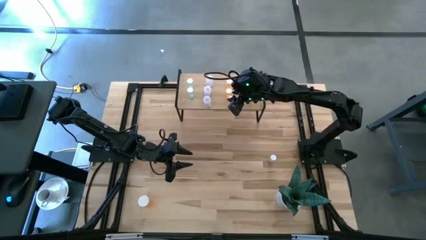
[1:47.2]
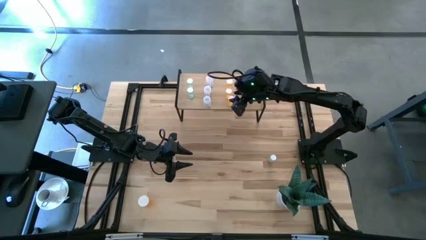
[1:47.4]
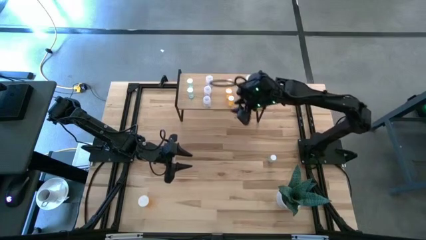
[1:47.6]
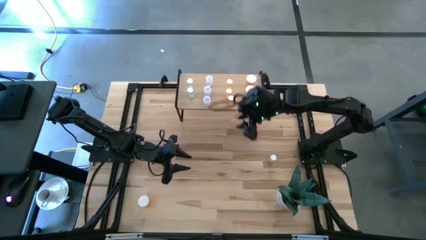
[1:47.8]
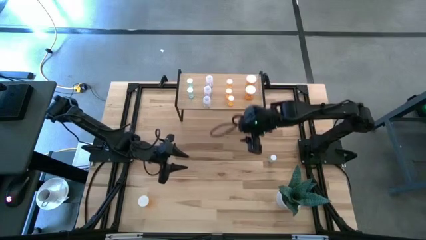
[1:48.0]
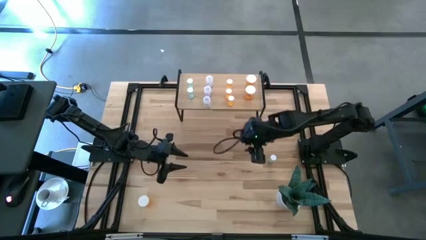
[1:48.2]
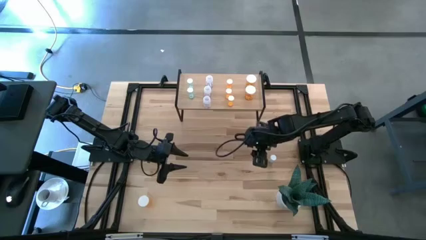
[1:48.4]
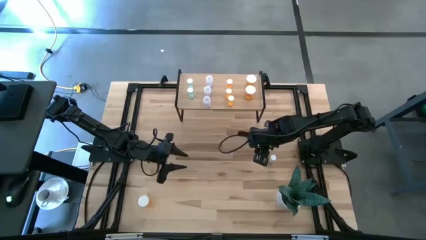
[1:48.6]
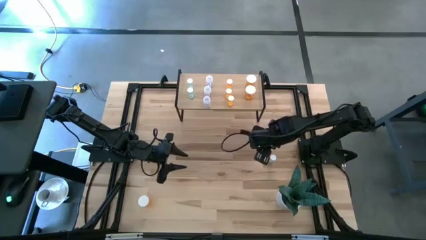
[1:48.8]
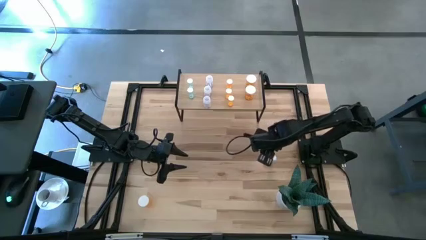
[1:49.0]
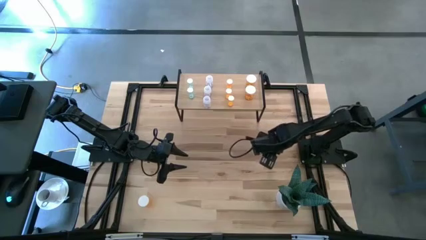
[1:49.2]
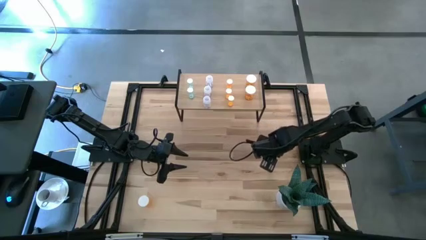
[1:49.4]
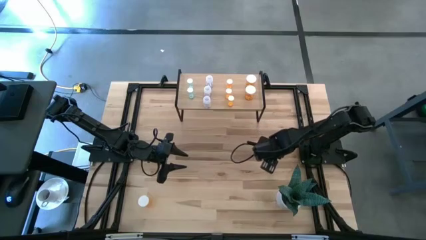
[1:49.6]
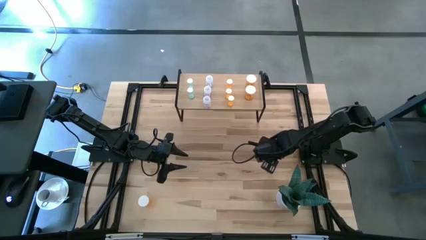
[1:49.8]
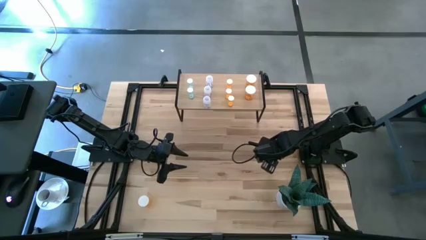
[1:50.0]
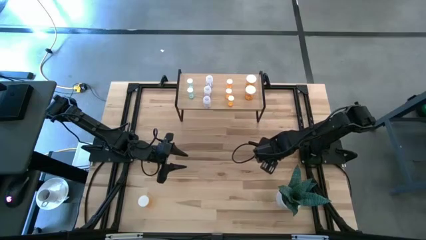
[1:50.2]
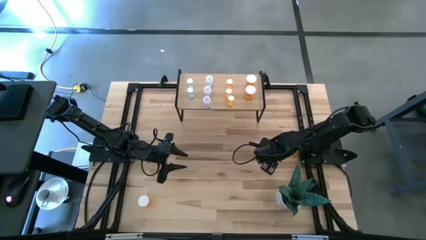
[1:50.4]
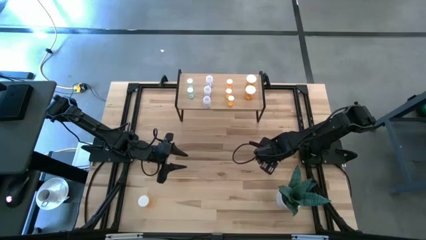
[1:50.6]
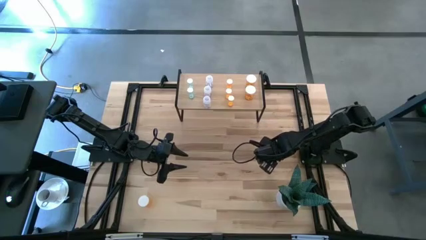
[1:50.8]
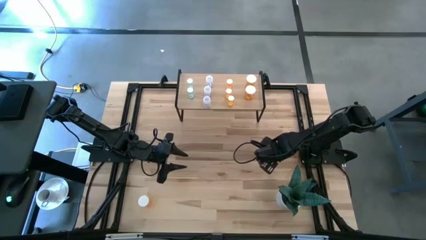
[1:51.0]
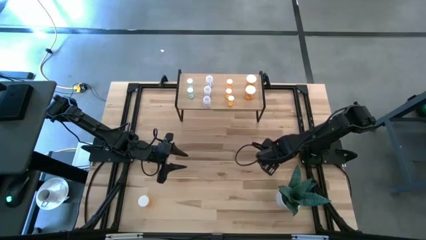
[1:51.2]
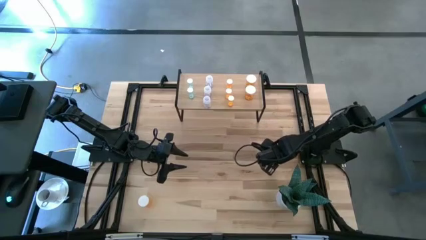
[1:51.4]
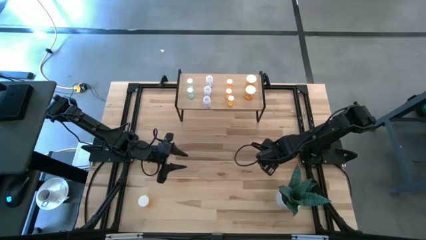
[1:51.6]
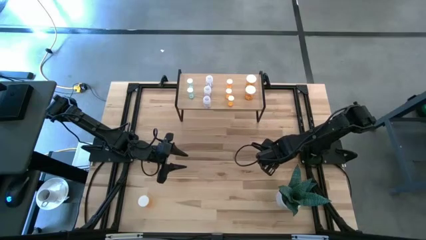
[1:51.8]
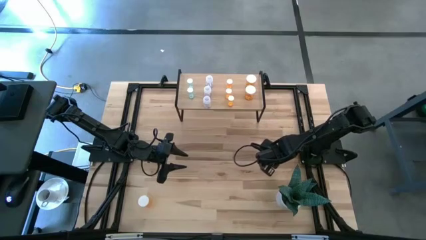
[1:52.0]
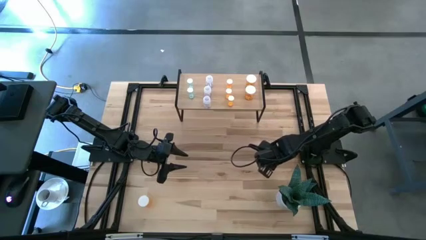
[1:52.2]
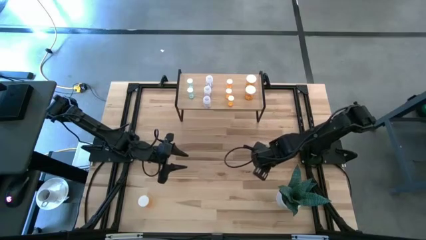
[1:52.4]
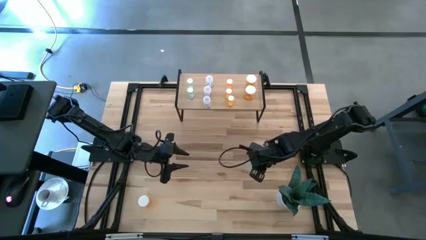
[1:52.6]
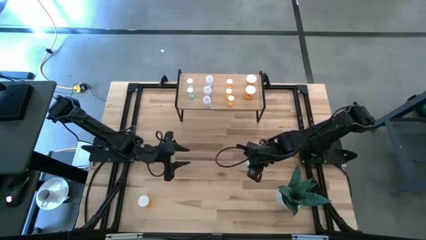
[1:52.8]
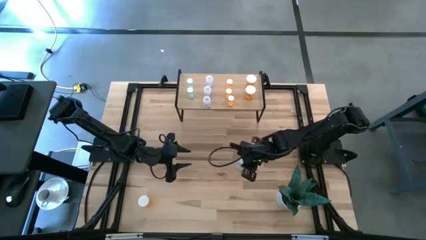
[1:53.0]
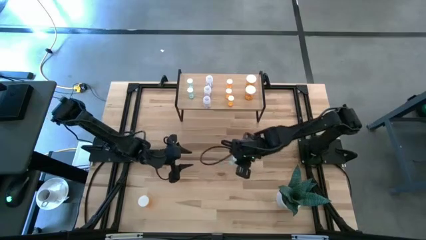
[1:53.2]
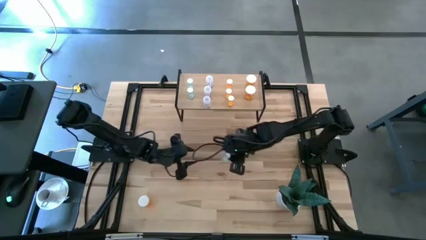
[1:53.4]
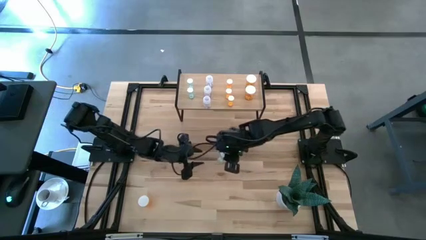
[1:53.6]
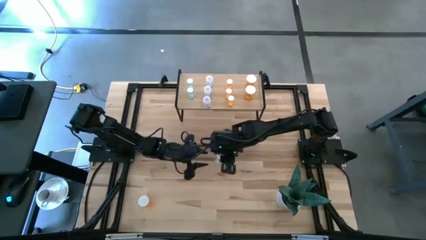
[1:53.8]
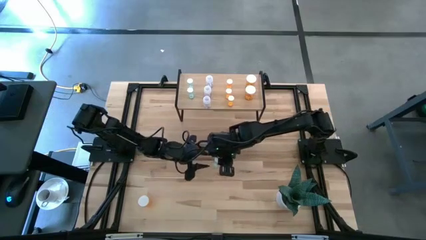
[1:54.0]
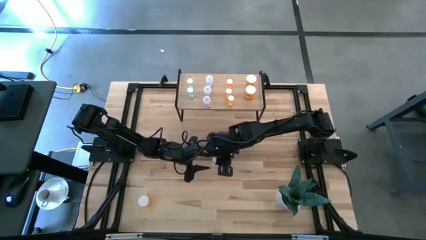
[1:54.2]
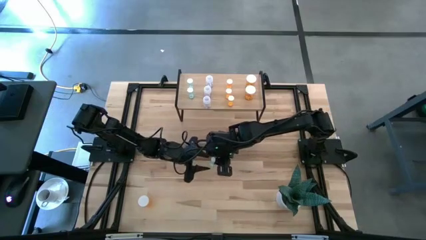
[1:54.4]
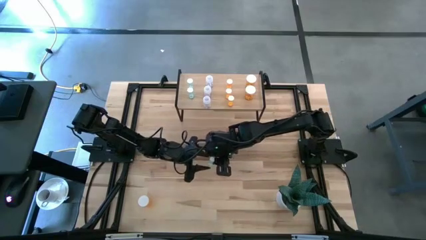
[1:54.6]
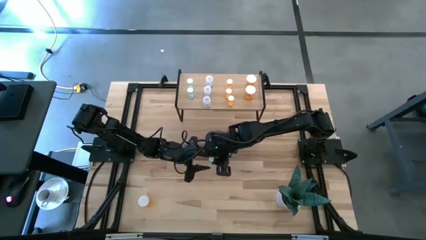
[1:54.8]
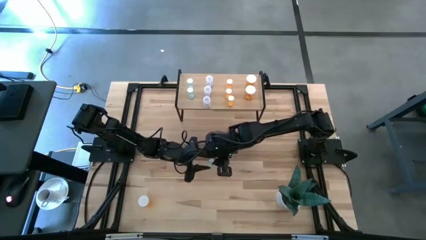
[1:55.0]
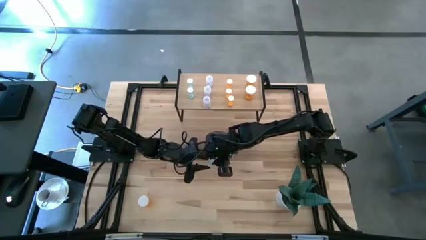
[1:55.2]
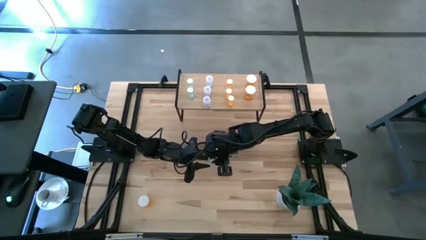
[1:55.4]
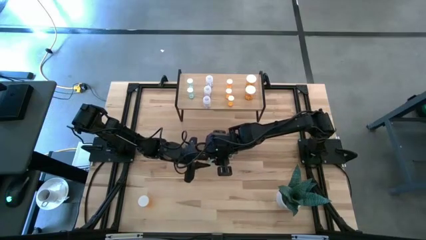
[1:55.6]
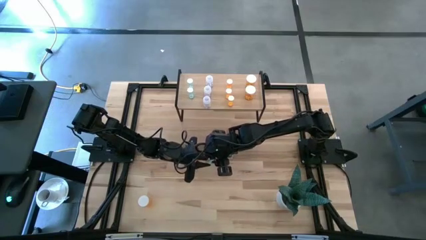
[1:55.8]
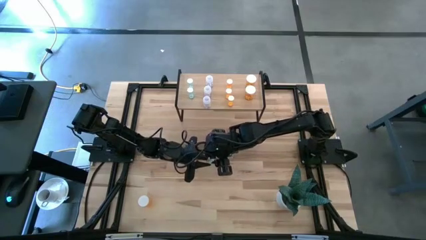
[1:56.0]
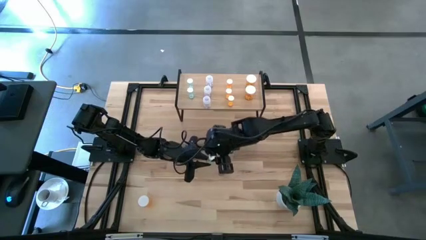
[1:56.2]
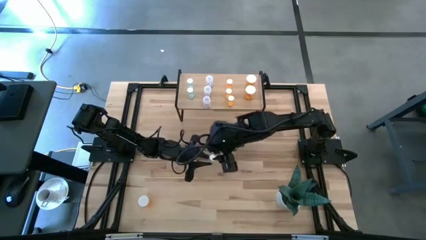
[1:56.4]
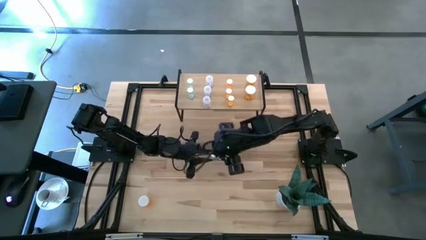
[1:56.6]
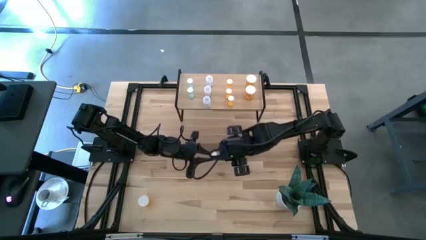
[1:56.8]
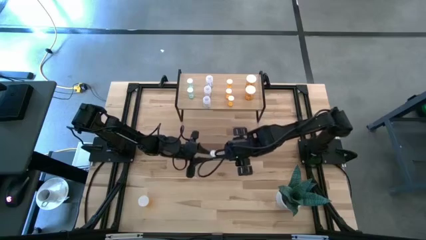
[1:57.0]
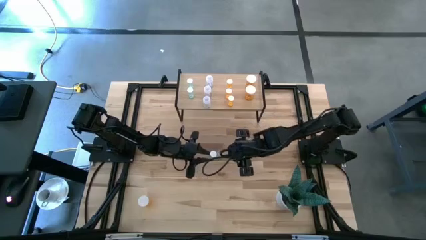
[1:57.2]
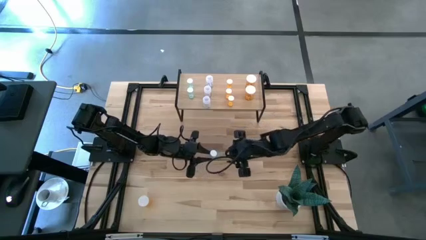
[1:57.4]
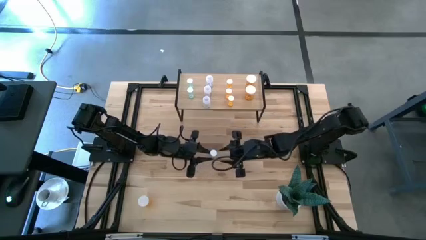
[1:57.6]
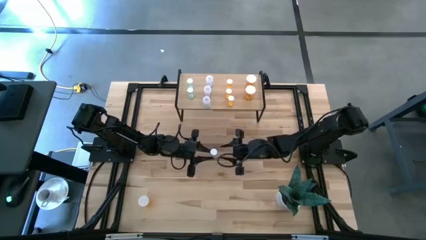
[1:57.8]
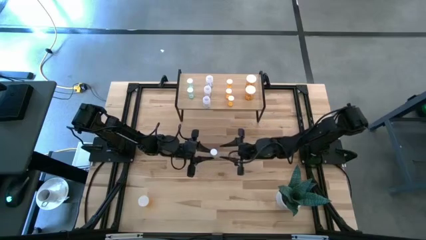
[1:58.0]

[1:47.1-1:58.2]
Task: Pick and place medicine bottles onto shelf by color
Put the blue pill bottle on the shelf aligned with the other blue pill bottles

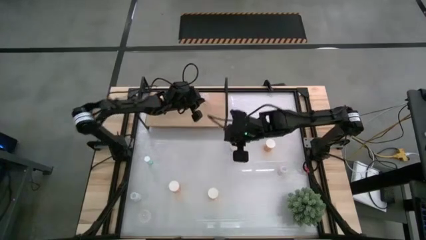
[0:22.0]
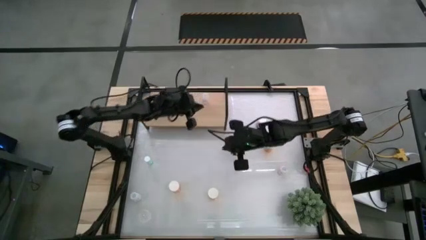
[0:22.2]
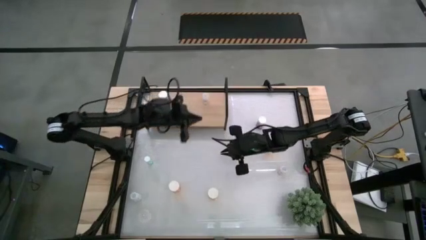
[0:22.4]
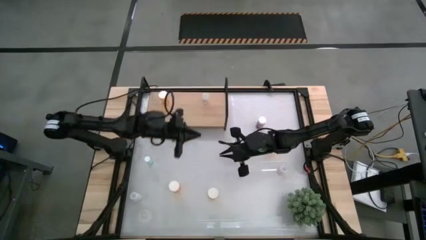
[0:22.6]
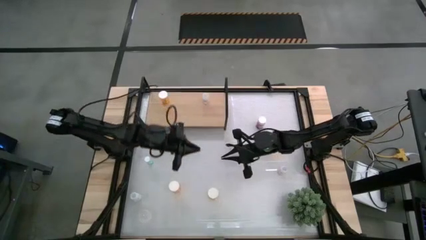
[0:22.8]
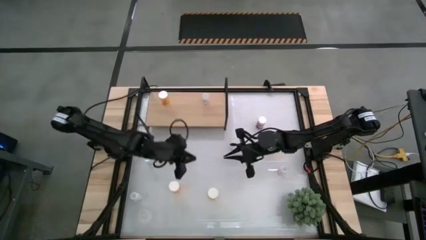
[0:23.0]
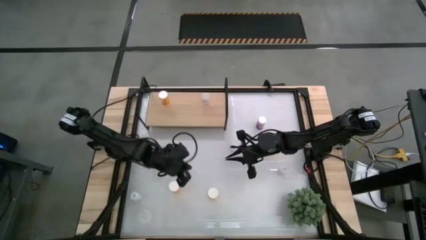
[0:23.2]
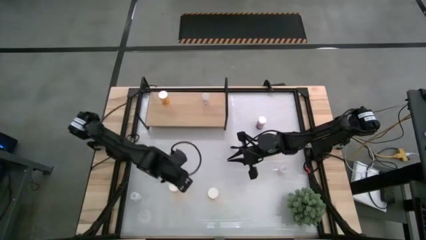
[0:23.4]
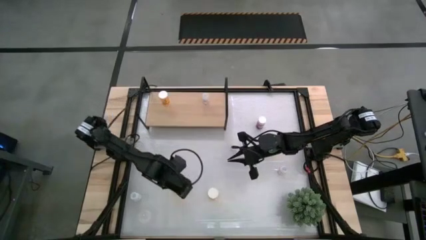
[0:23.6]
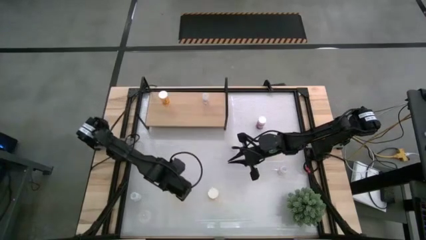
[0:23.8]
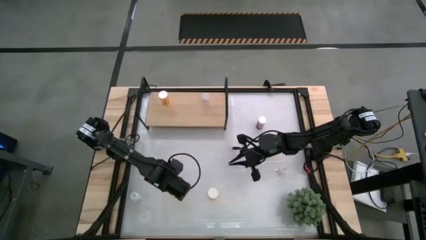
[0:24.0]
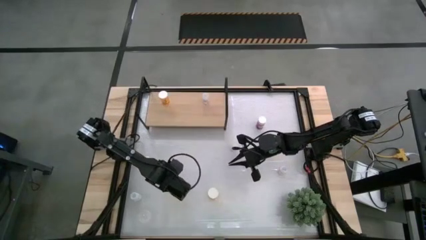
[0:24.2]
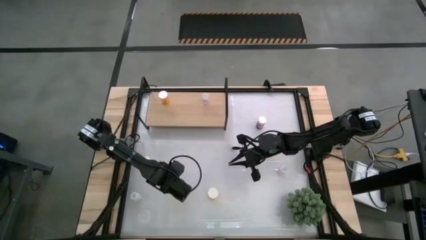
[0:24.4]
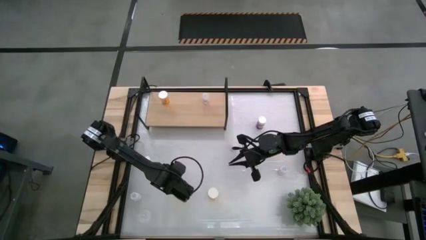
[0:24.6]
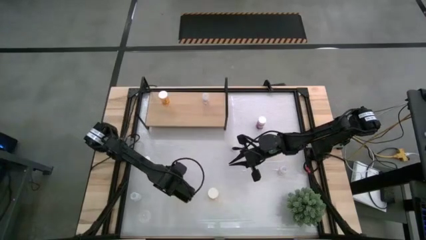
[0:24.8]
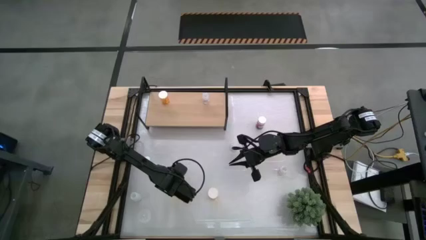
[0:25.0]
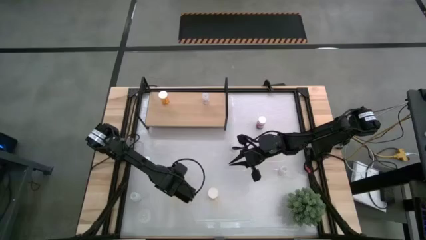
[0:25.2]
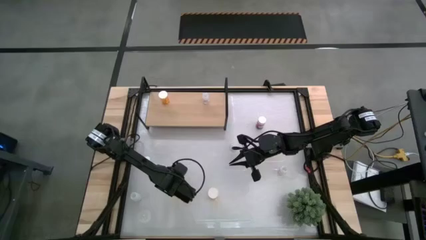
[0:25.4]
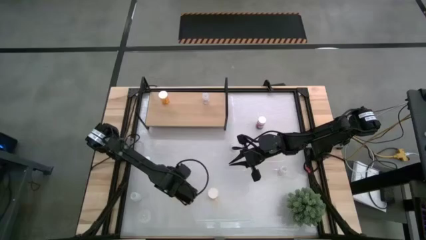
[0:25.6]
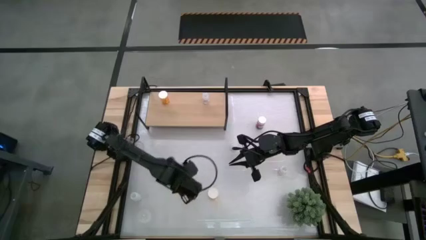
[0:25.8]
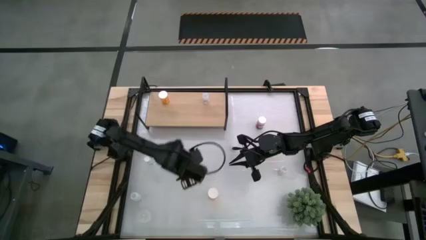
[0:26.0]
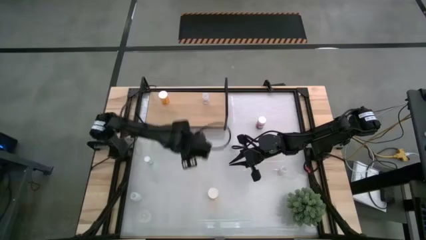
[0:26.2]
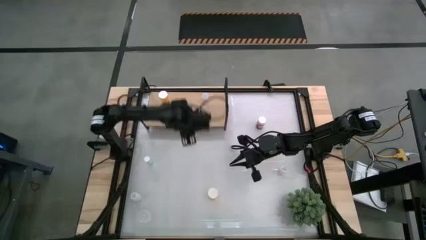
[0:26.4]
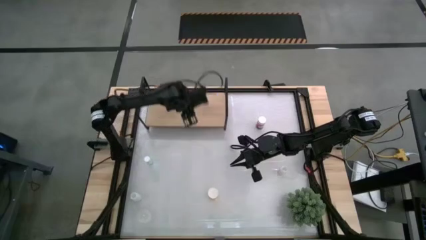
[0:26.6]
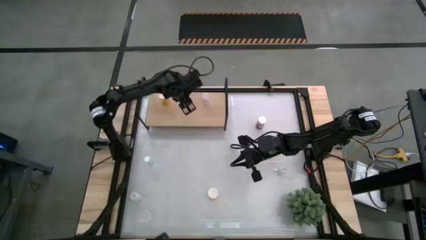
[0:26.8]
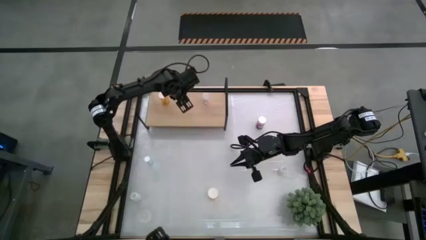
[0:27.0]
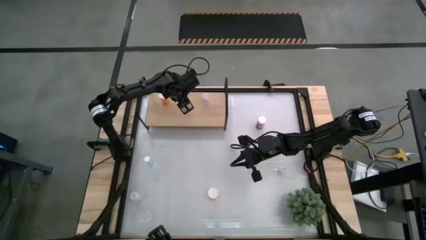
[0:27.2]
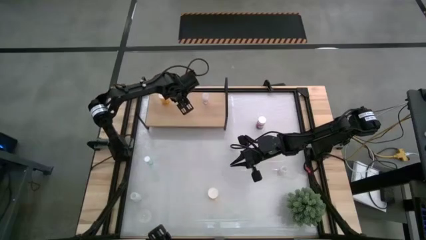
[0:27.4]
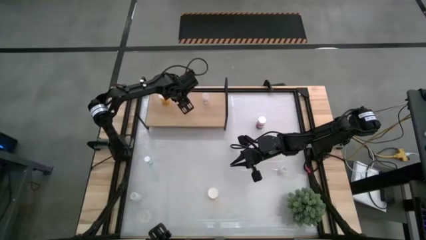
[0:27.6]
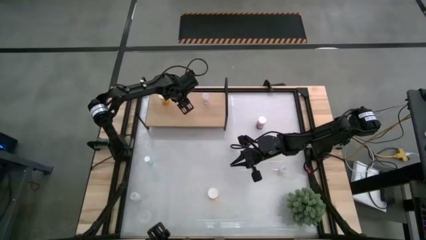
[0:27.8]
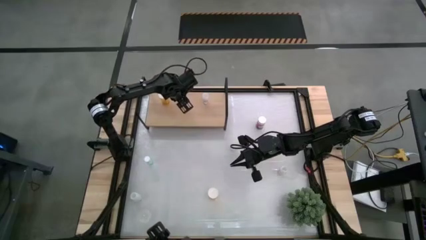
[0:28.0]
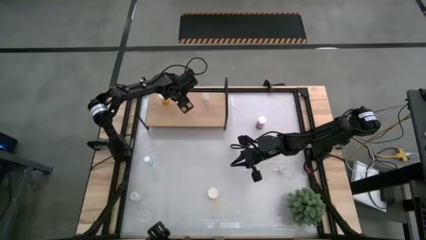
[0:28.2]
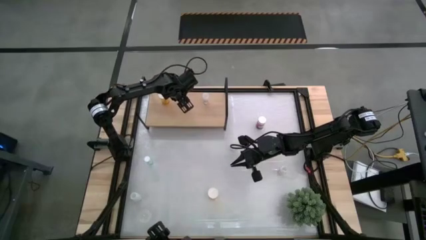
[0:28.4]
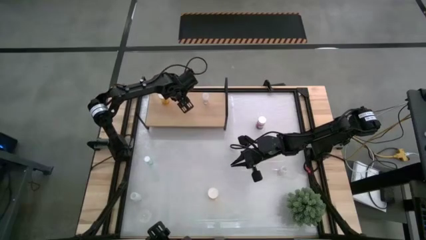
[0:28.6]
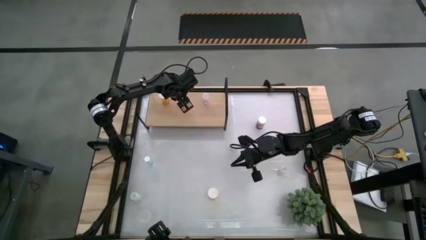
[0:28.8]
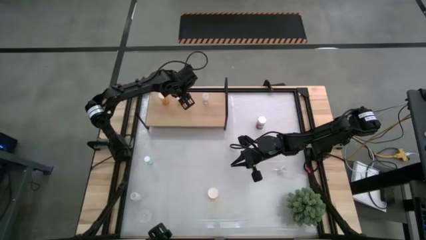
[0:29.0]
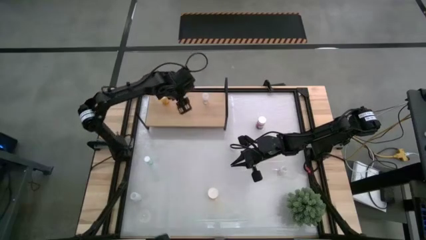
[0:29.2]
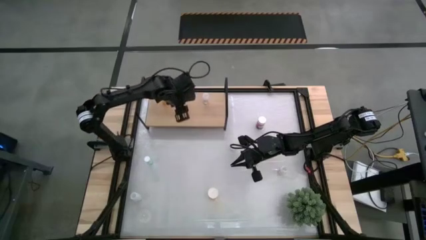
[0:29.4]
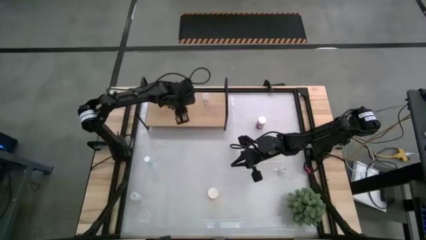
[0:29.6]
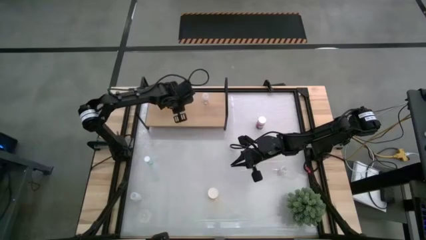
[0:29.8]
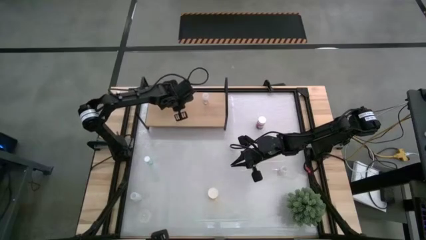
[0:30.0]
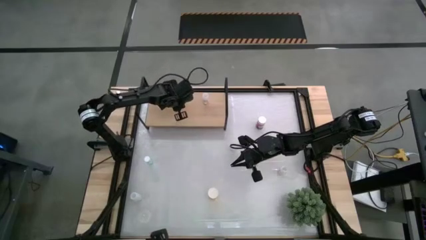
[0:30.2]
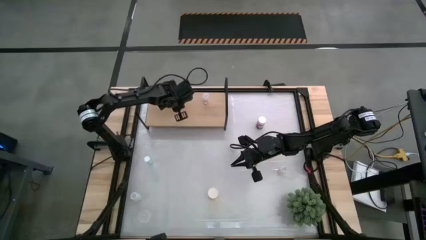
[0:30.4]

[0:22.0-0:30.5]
Task: Pick and place medicine bottles onto shelf by color
Put the left large yellow pill bottle on the shelf
